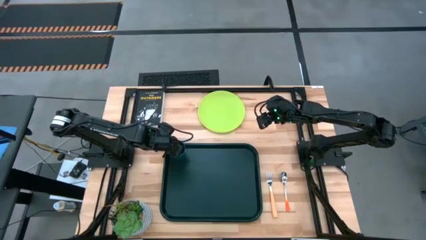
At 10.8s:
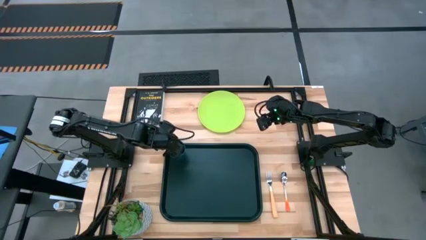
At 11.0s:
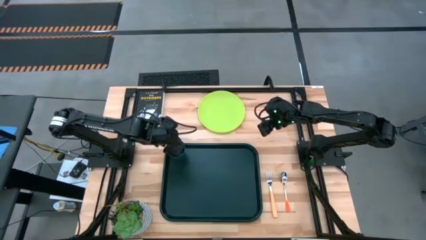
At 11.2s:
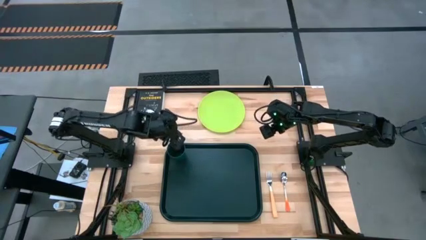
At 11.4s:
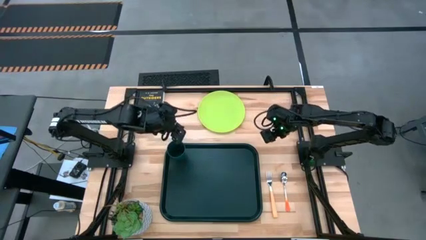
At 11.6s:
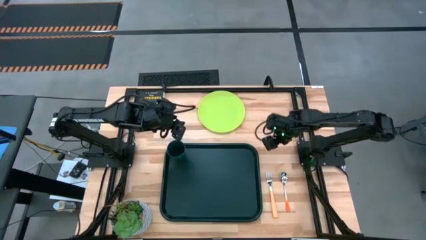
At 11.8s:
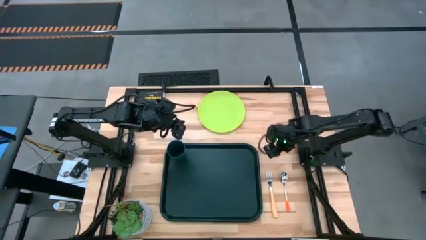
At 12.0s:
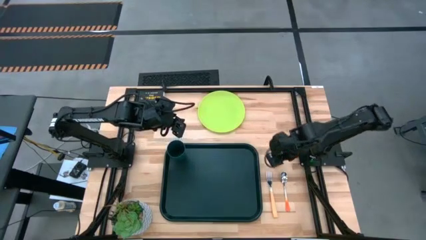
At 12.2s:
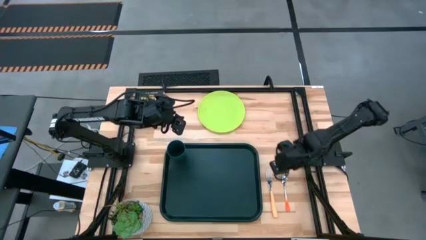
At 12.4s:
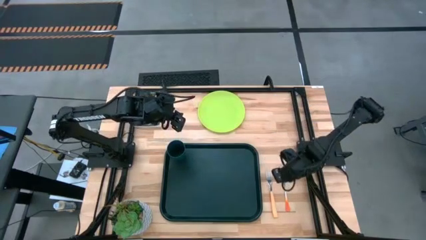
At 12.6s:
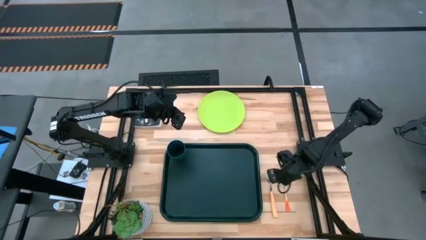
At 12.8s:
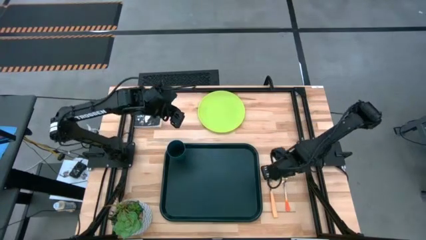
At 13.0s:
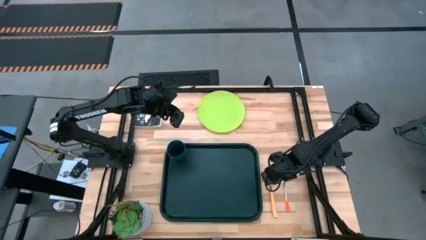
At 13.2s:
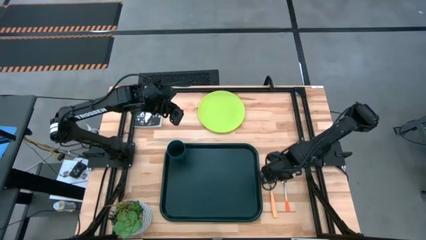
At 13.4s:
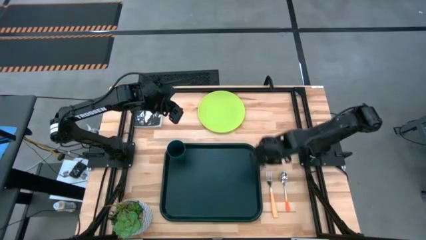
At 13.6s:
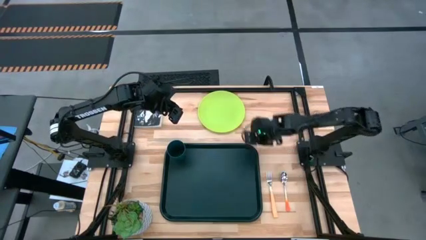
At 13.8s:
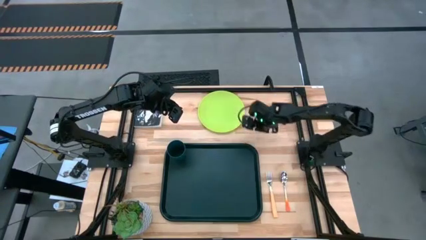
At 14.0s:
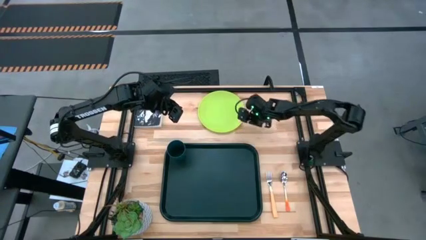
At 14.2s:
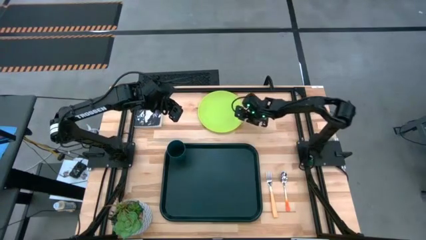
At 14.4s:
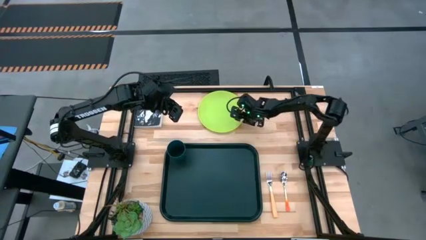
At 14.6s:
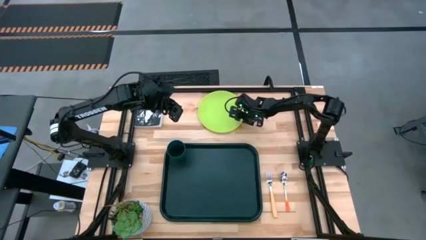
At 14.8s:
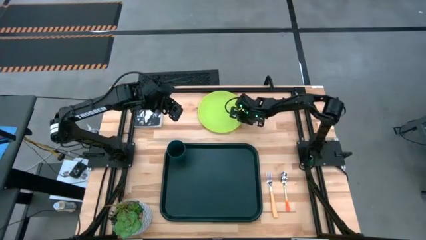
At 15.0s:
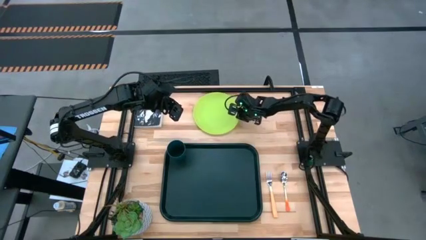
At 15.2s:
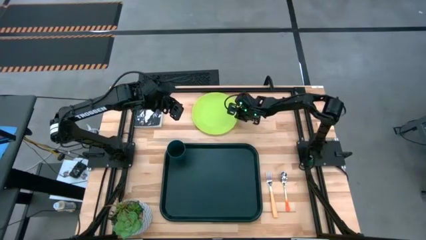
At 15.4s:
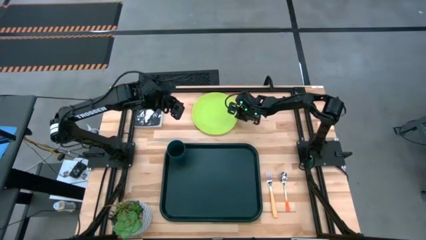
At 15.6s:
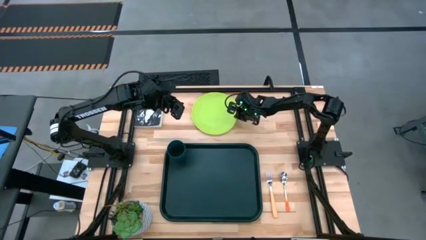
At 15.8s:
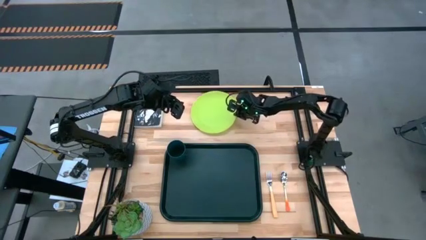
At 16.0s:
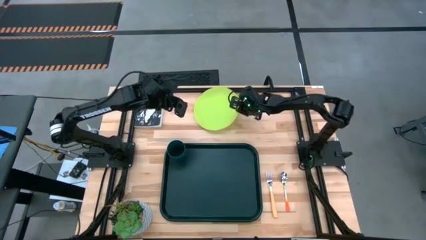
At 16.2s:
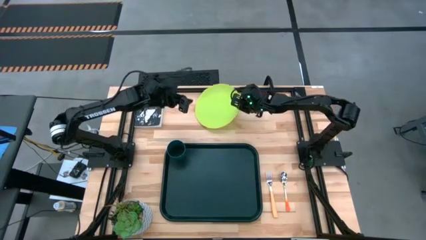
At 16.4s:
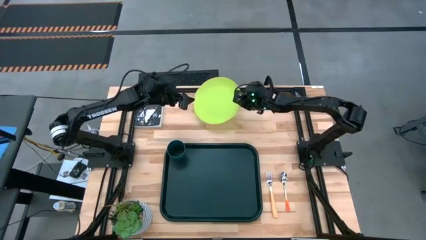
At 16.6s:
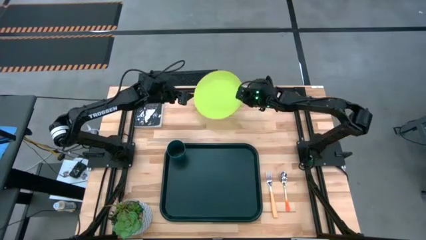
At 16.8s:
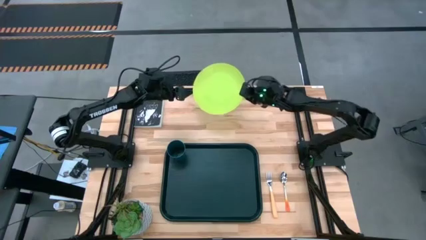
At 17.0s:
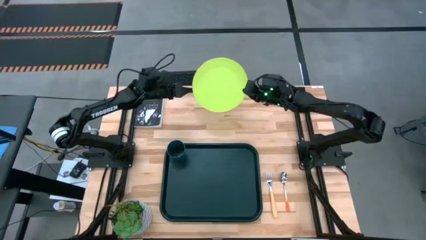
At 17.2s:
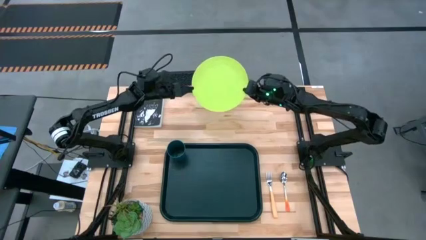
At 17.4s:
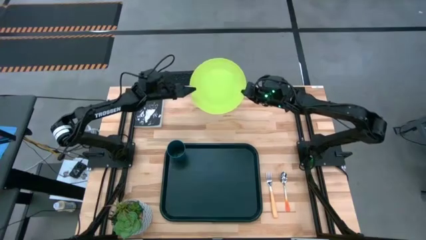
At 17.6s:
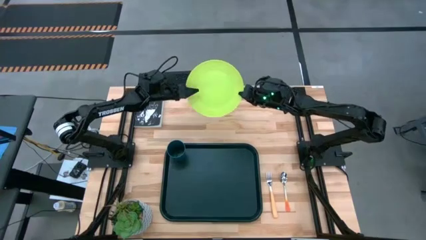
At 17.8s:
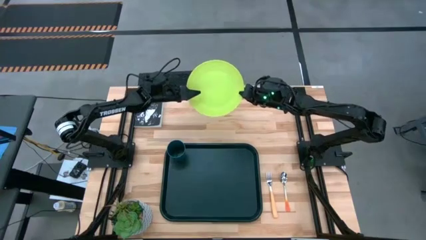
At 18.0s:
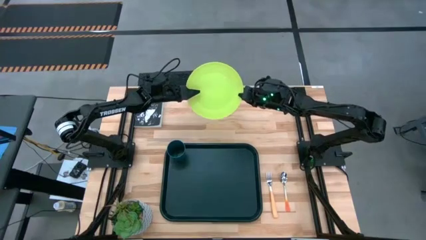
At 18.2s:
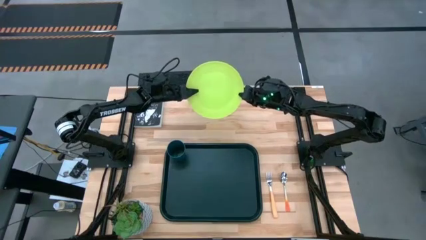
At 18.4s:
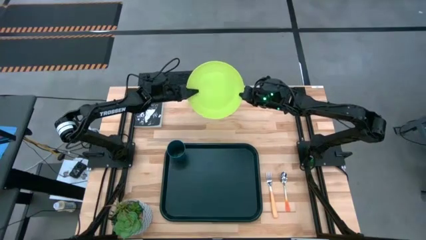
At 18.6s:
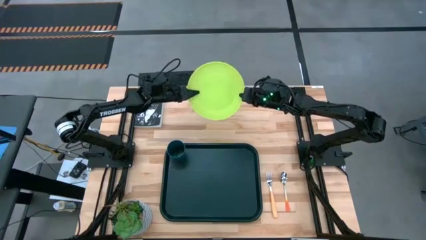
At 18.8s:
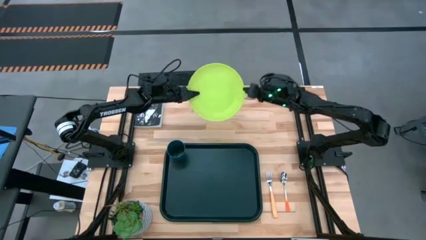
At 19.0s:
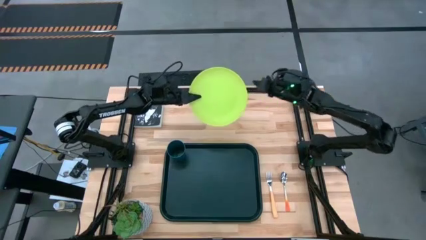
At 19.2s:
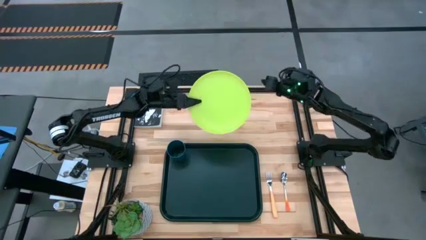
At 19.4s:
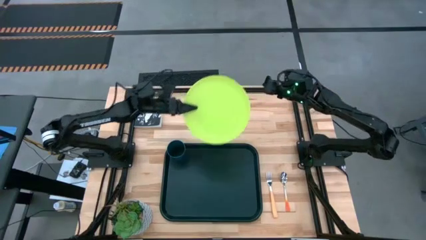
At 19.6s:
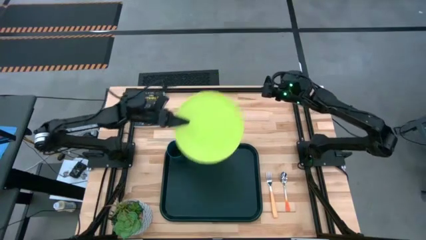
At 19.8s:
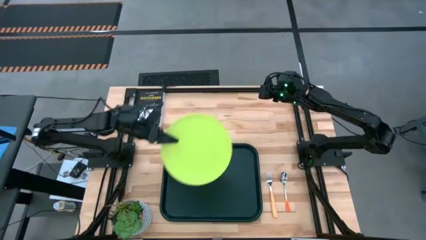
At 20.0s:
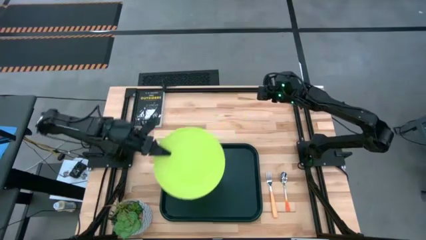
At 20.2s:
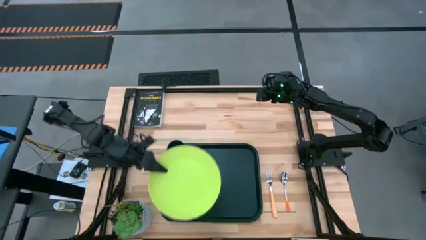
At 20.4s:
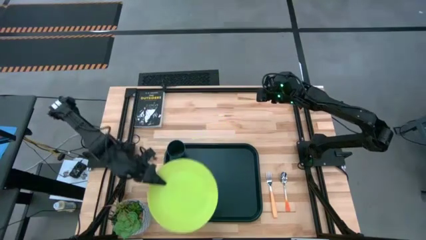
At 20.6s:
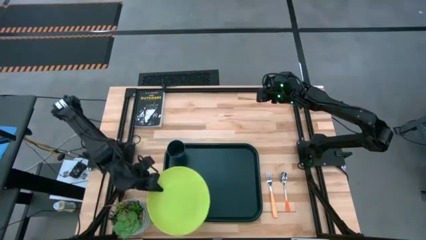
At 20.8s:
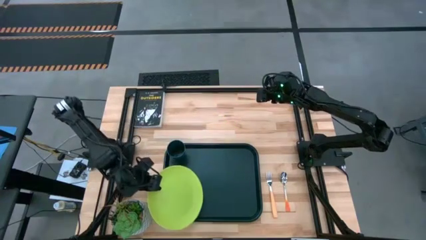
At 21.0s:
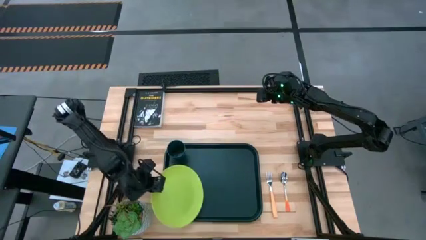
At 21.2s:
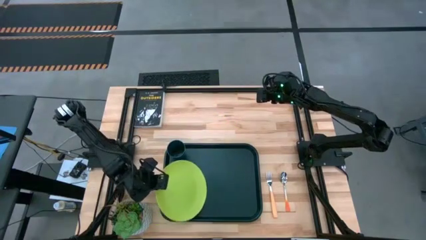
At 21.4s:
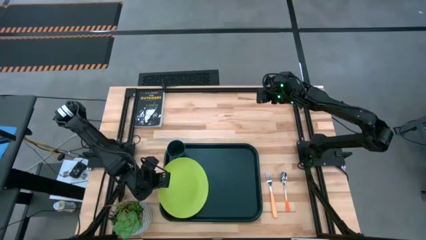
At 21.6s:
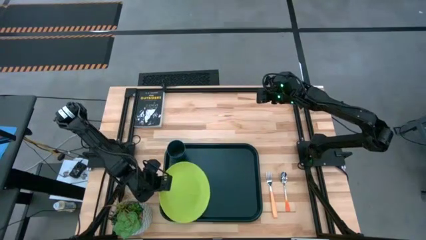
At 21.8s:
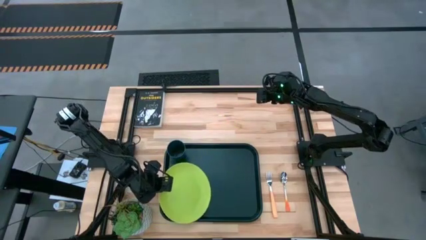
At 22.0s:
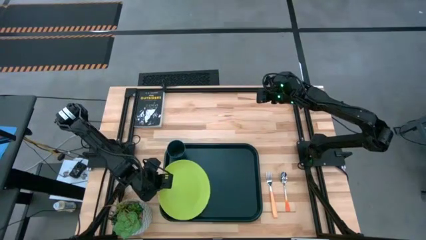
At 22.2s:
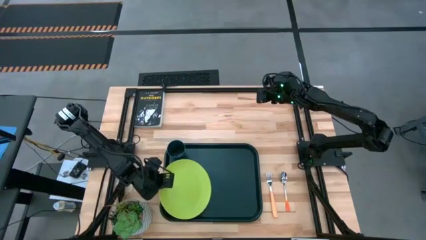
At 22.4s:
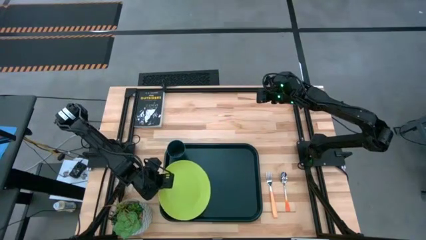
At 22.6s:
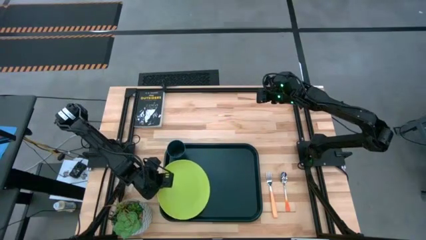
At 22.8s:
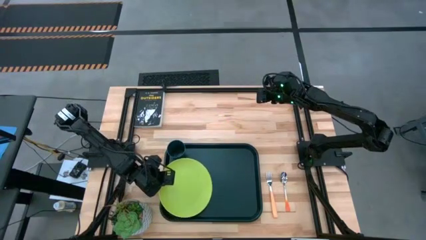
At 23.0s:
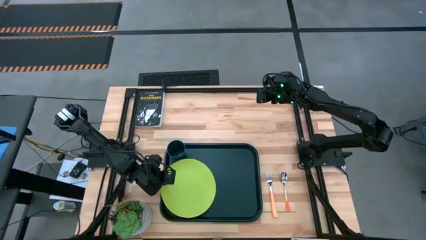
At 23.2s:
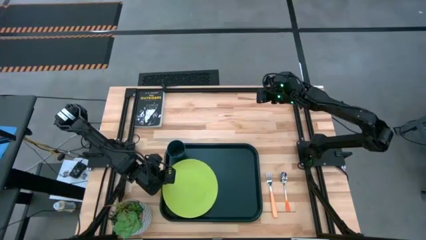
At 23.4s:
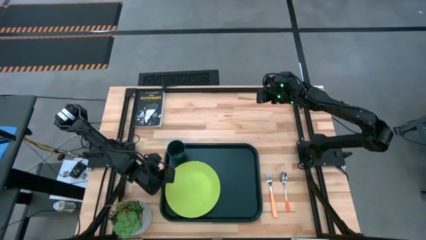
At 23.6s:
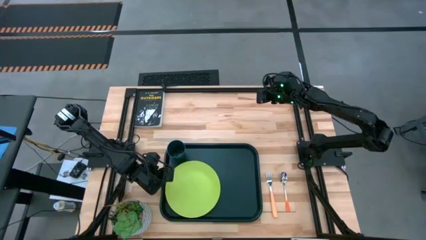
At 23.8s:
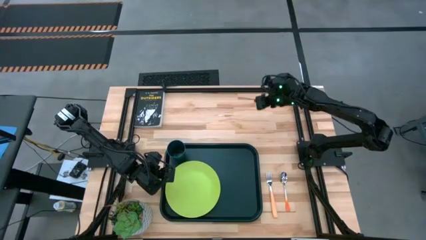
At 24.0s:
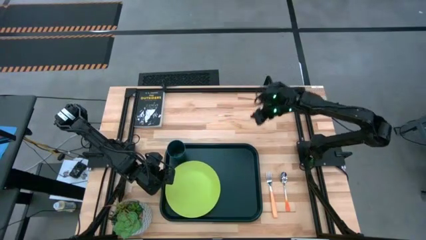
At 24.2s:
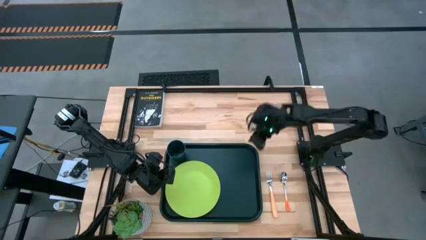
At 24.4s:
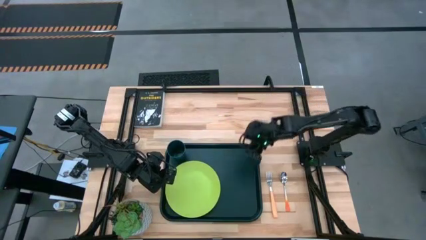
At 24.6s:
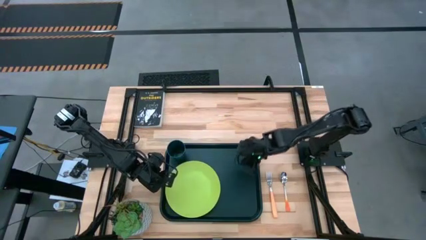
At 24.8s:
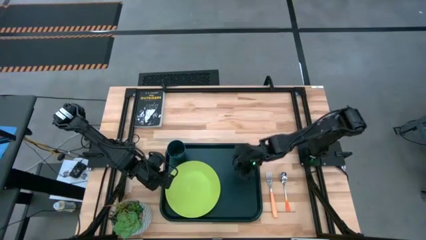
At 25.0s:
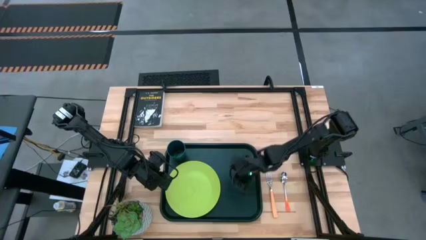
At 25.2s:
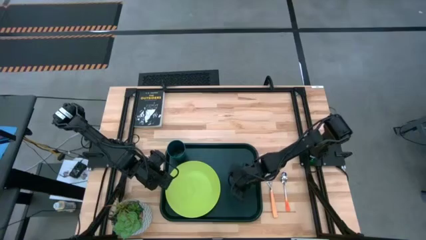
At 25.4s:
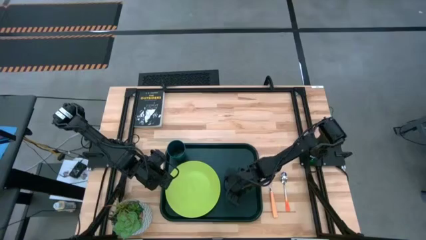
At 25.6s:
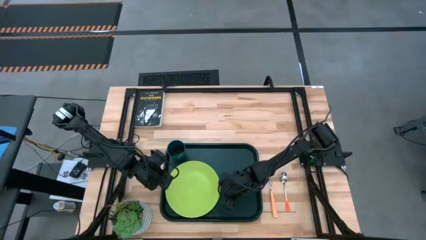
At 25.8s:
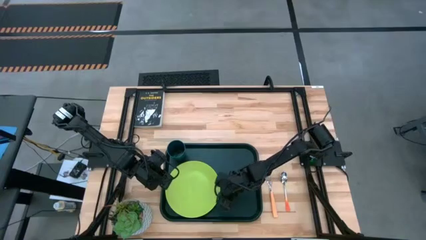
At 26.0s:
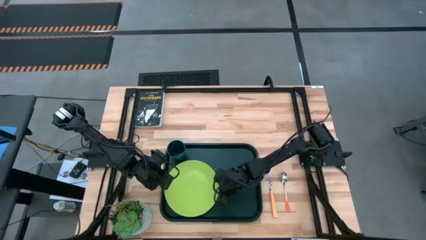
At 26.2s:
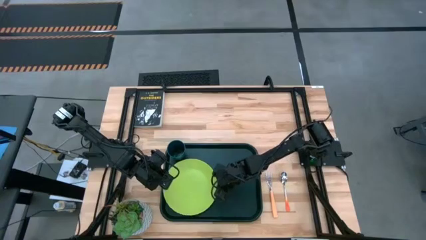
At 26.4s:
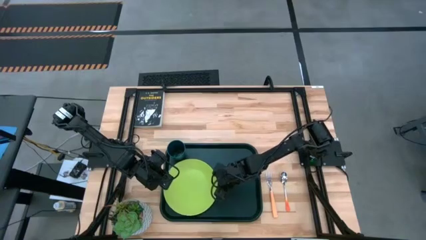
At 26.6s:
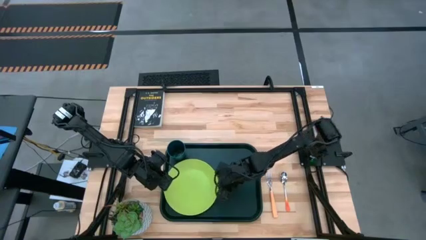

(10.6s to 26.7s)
Task: Pick and place plate/cup/fork/spoon on tray
Put the green plate on the black serving tray
